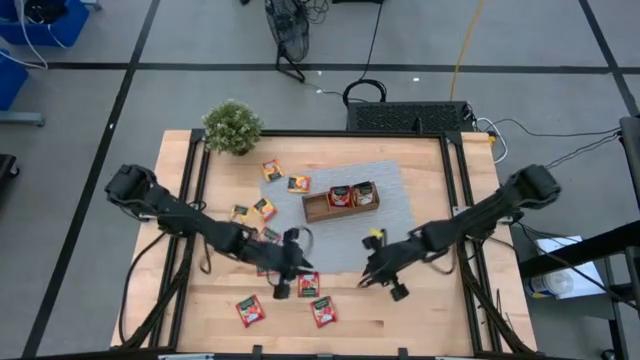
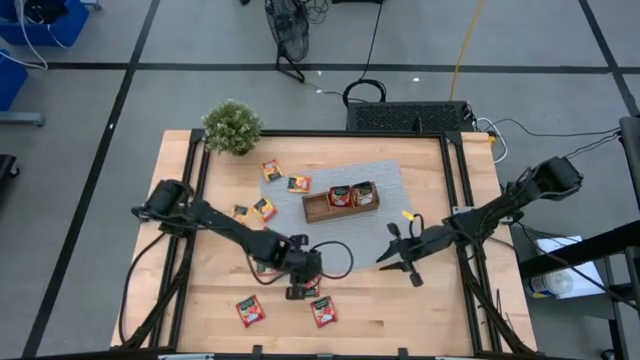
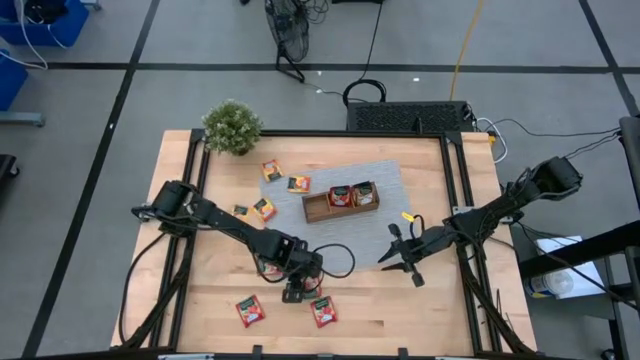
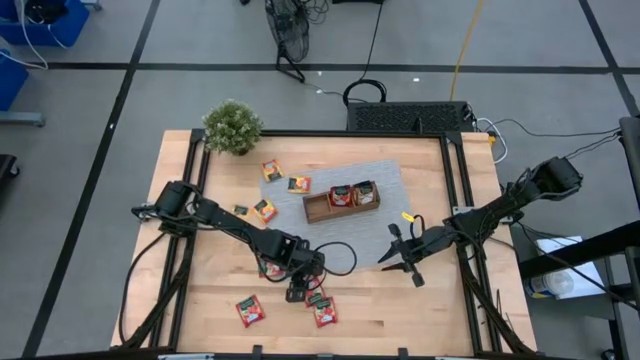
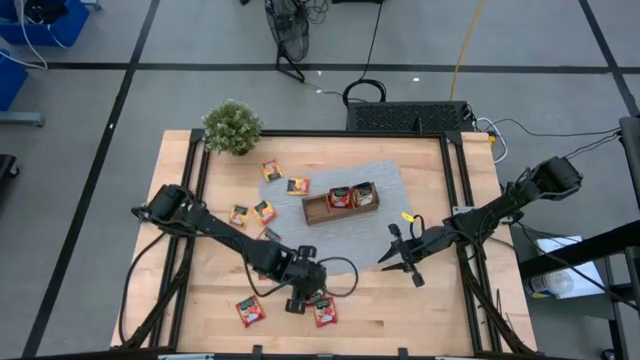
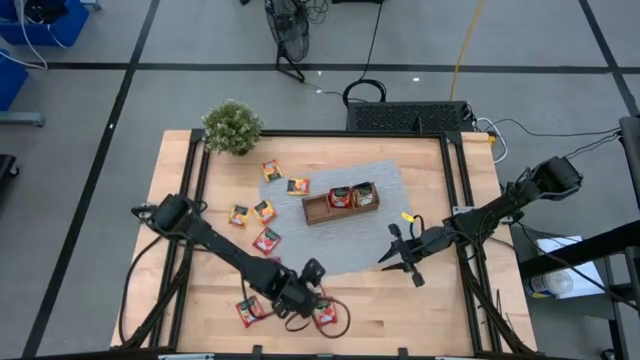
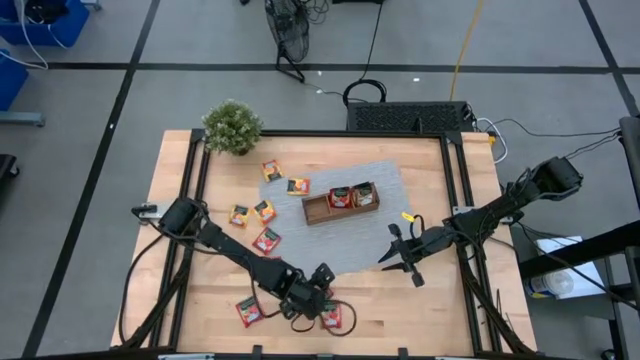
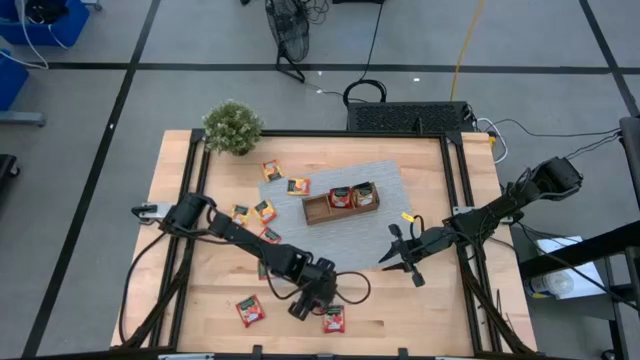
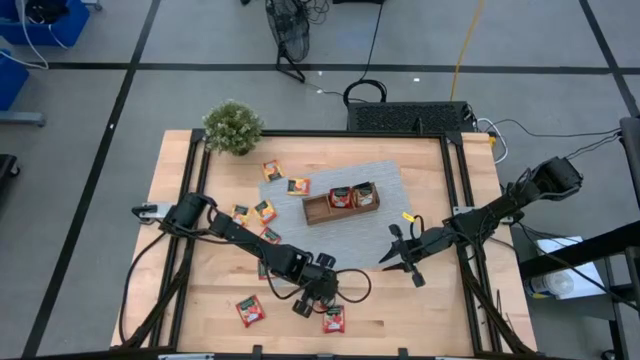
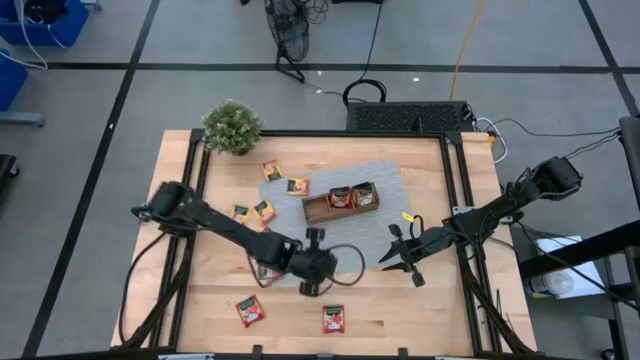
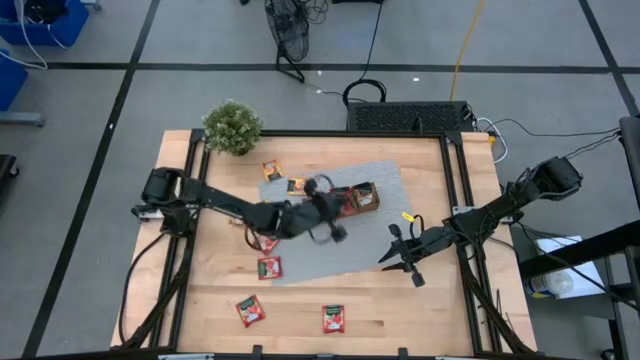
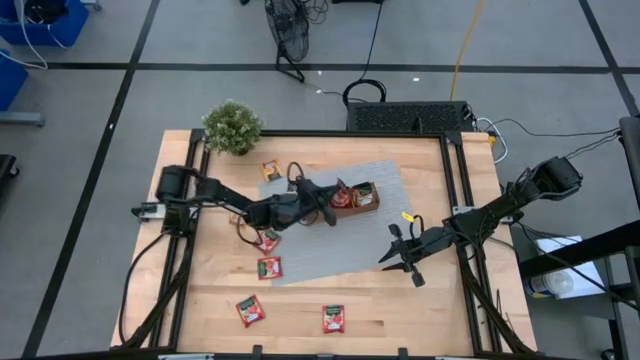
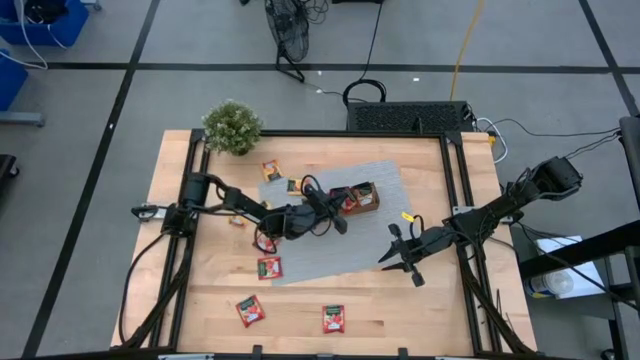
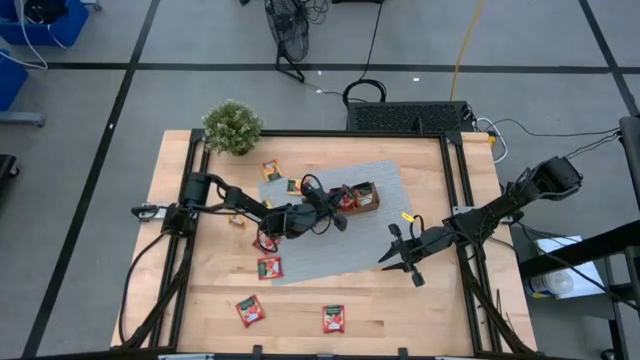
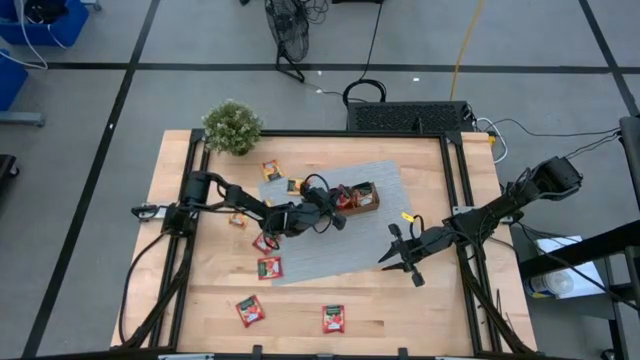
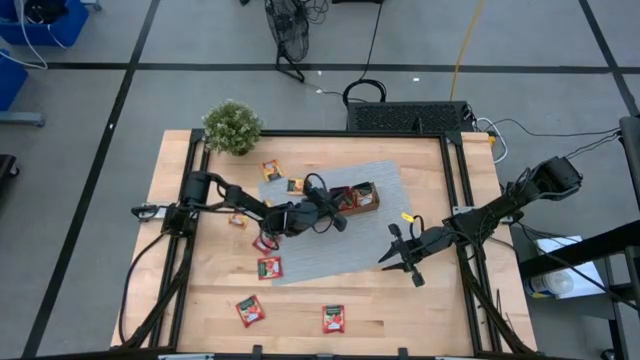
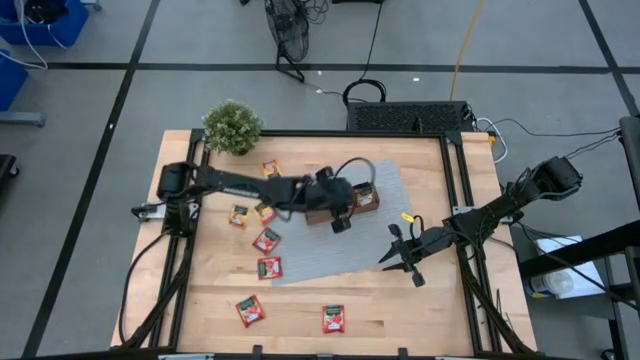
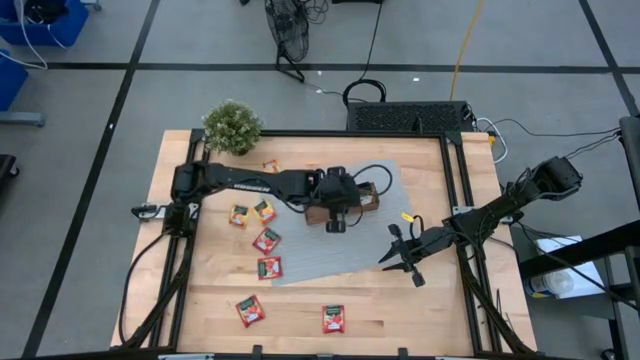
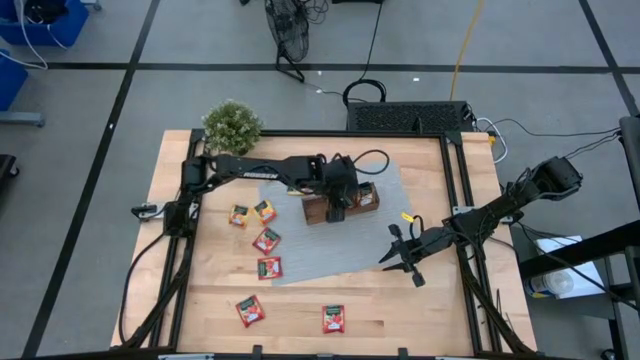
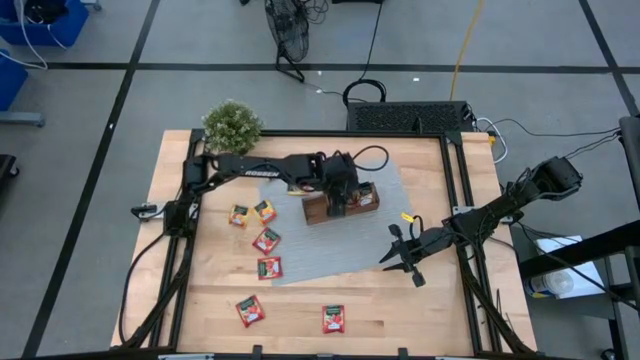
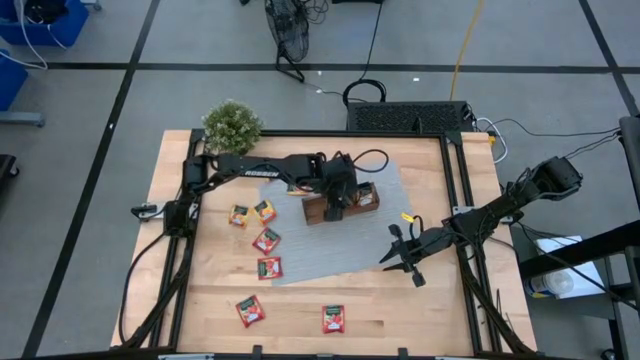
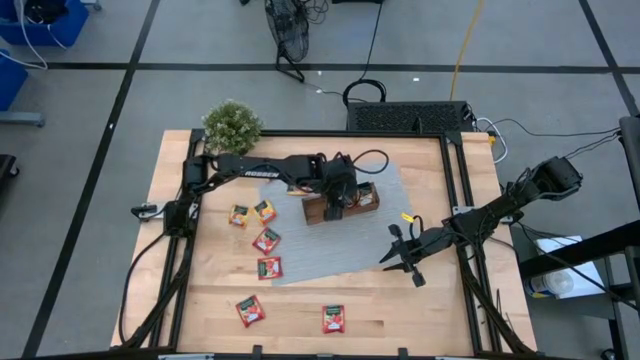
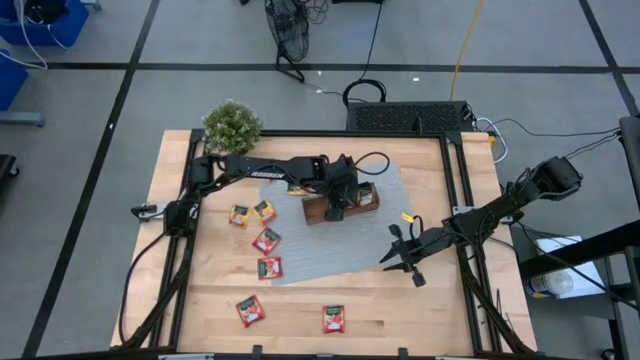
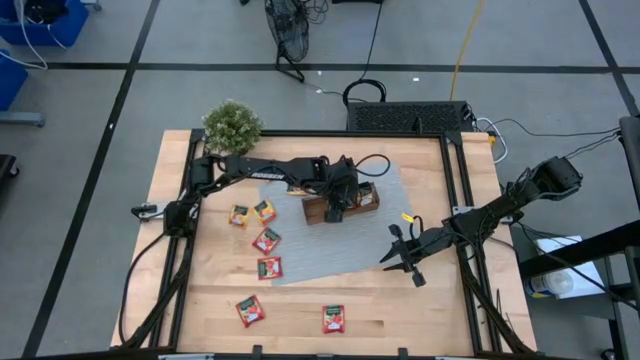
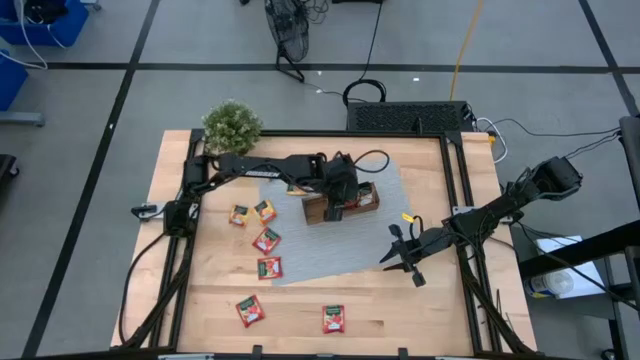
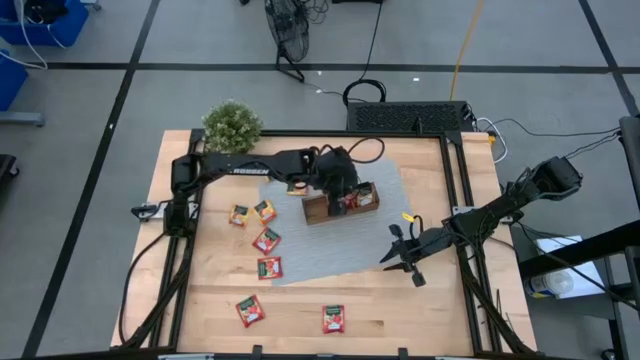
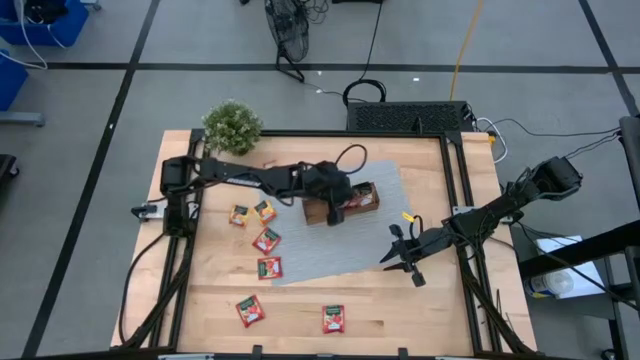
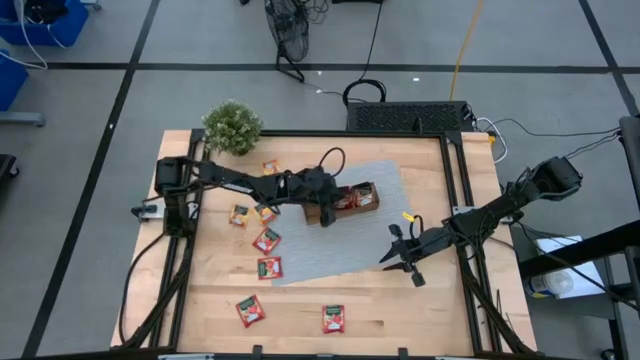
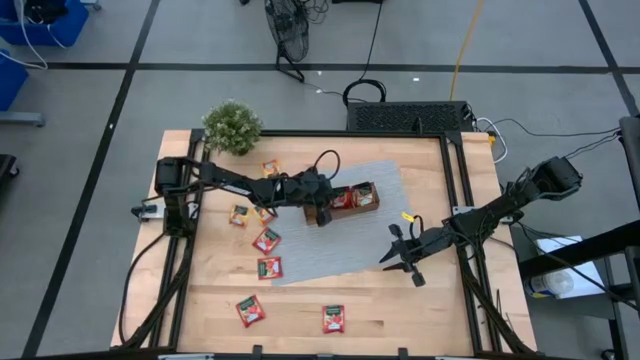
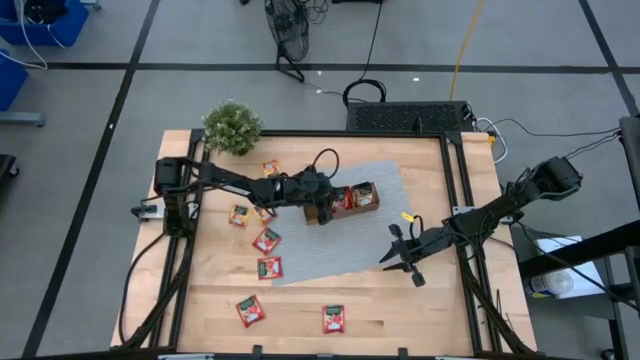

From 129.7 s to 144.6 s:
Task: Pick & Place Tea
Put the red tea bag into the middle section of the wooden organizer

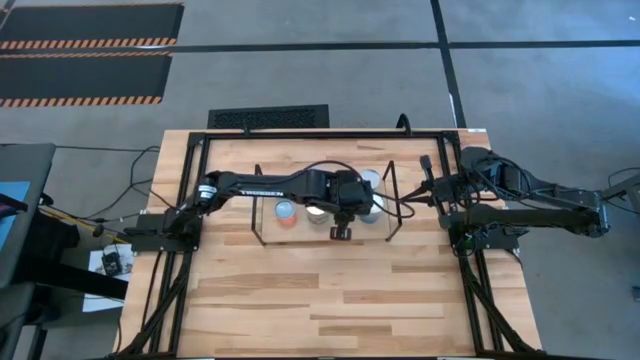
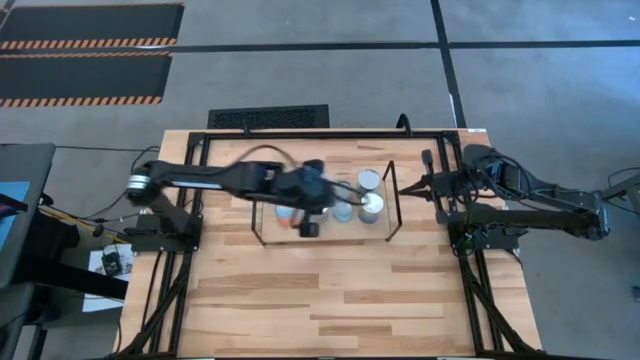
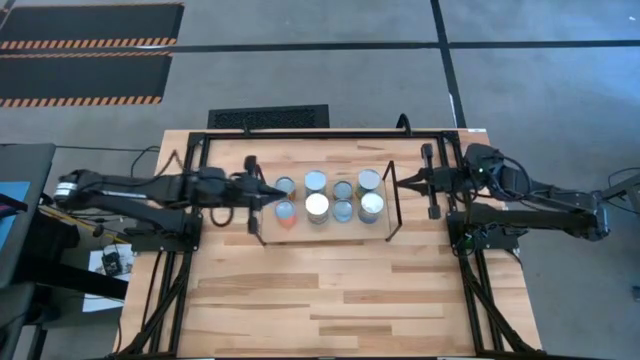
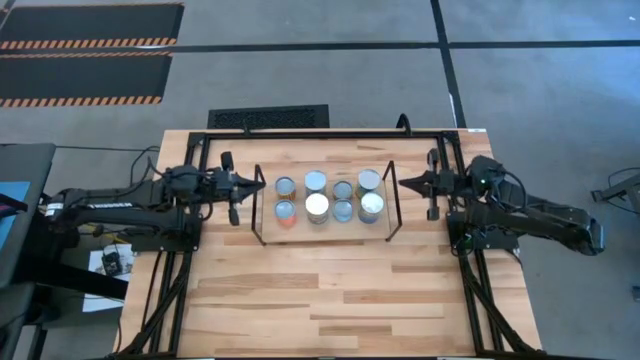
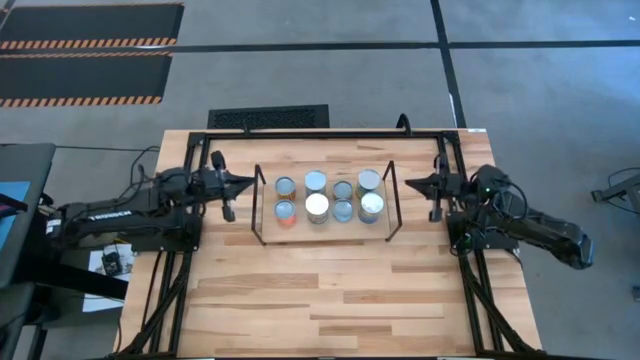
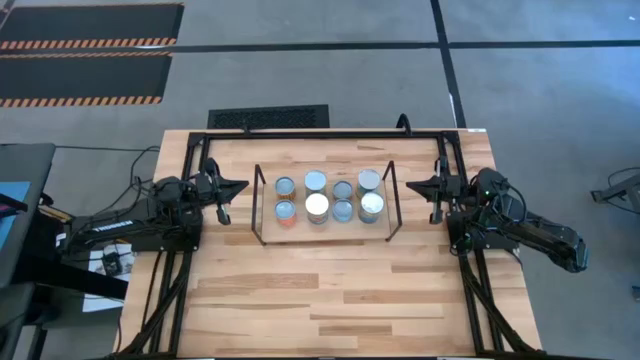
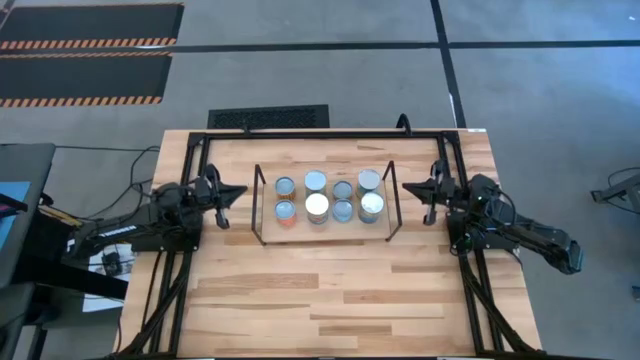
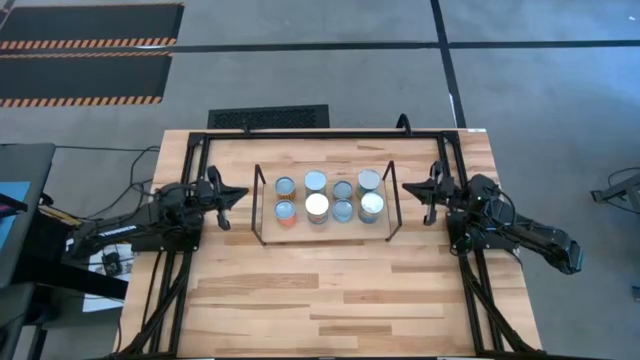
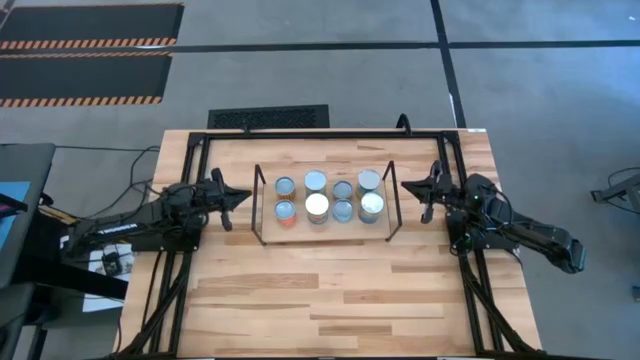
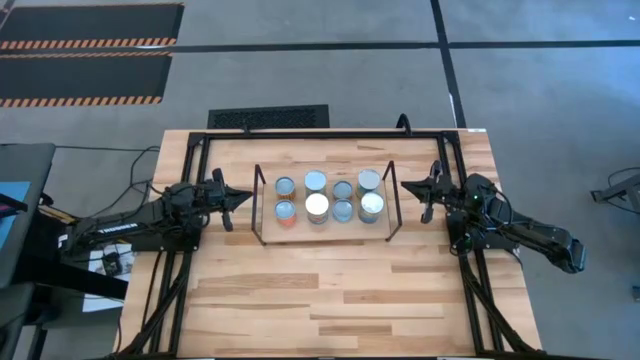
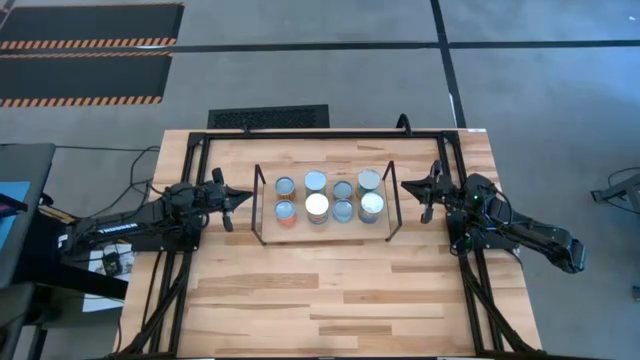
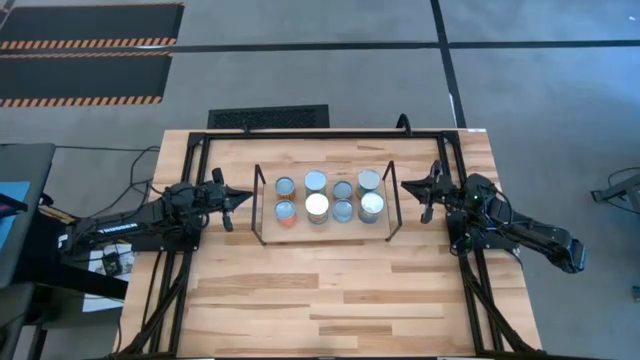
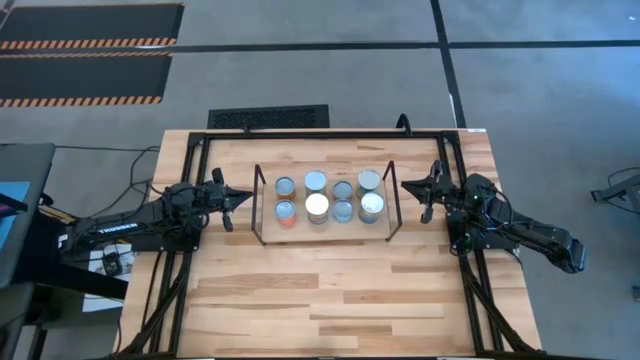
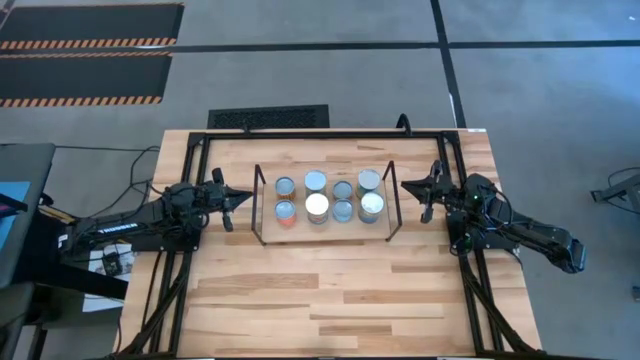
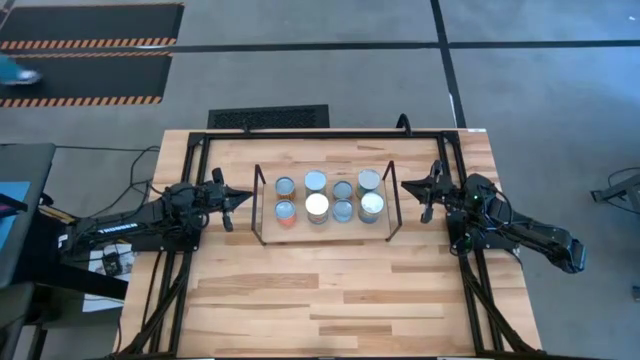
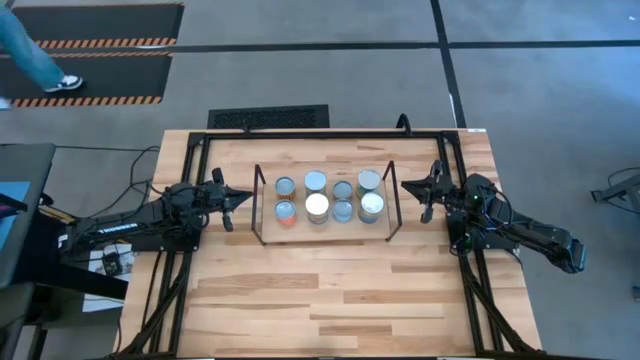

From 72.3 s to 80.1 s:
Task: Pick and place cans onto a shelf
Return to Home Position
